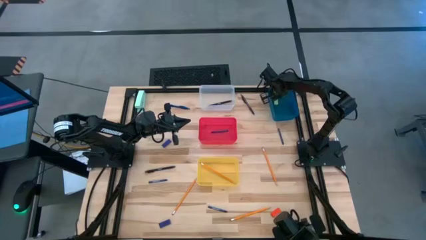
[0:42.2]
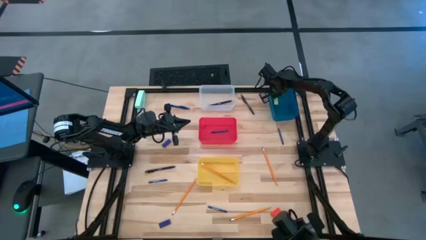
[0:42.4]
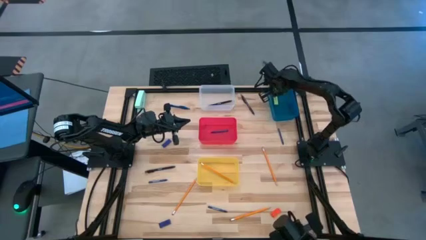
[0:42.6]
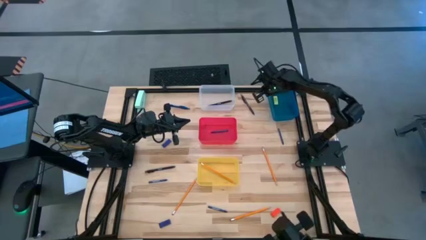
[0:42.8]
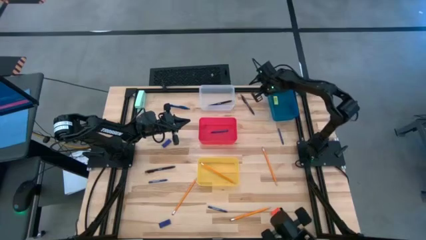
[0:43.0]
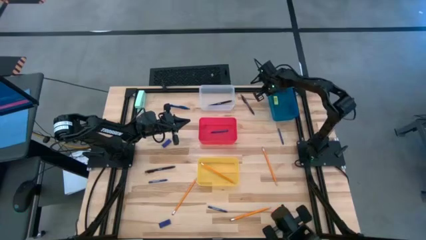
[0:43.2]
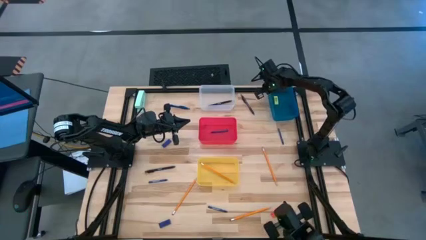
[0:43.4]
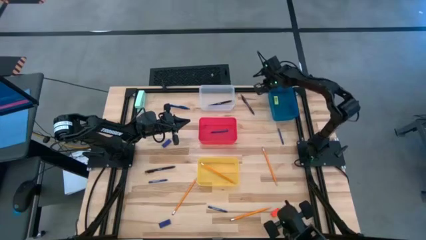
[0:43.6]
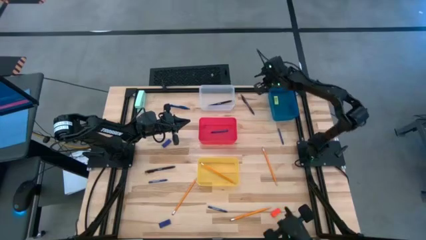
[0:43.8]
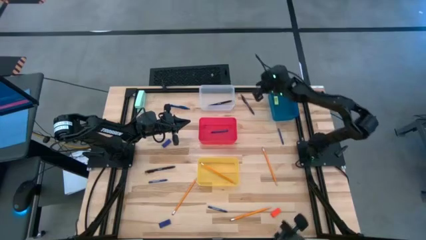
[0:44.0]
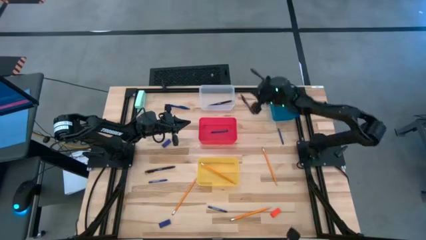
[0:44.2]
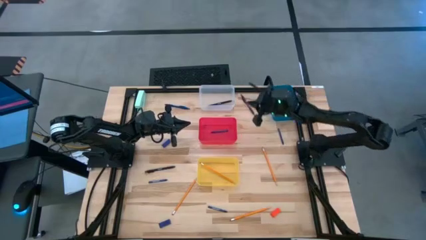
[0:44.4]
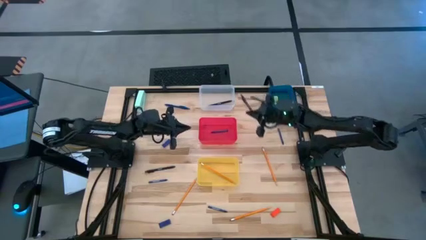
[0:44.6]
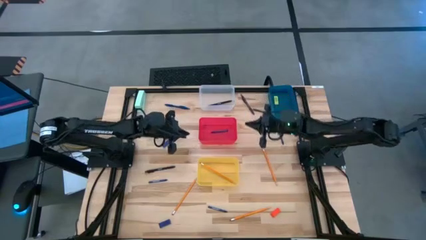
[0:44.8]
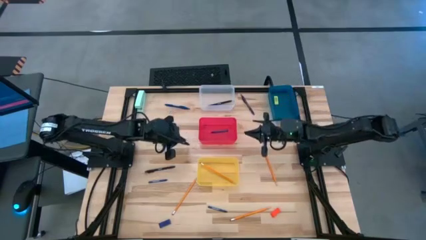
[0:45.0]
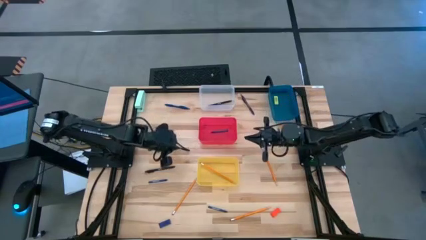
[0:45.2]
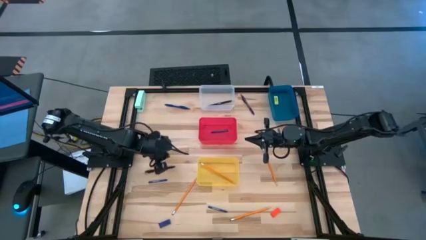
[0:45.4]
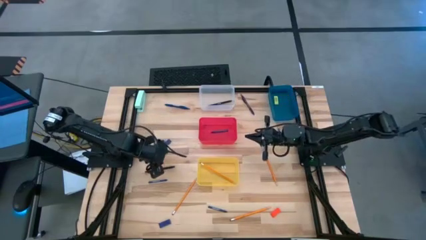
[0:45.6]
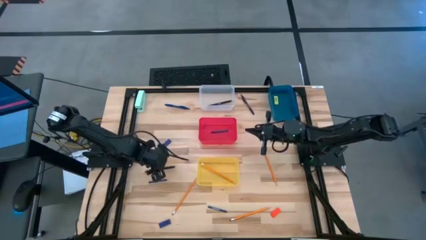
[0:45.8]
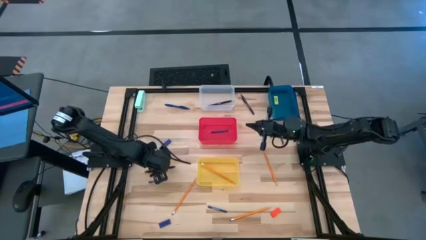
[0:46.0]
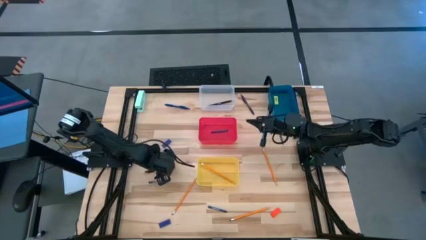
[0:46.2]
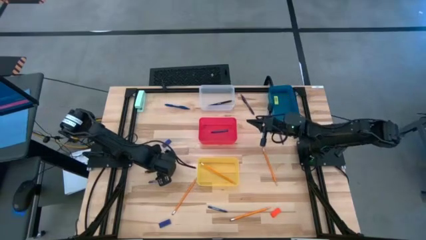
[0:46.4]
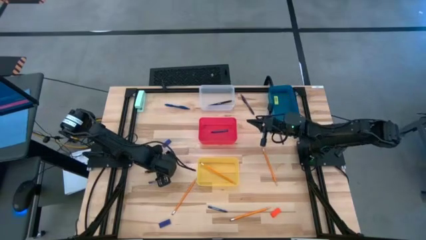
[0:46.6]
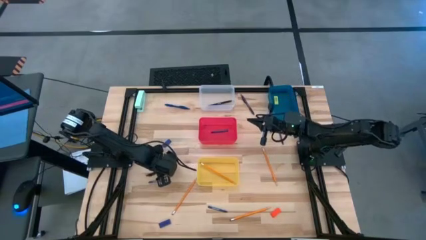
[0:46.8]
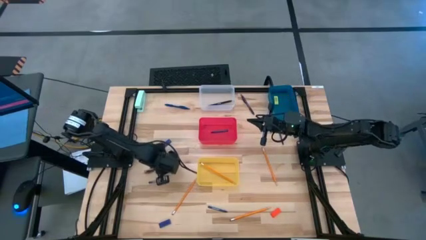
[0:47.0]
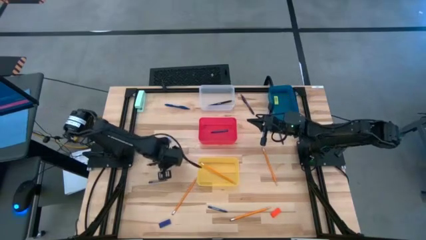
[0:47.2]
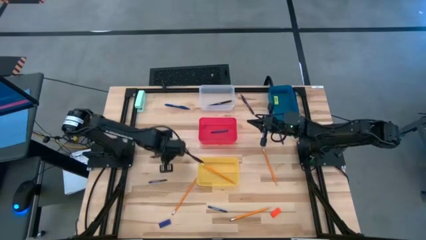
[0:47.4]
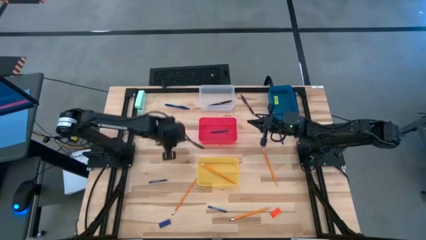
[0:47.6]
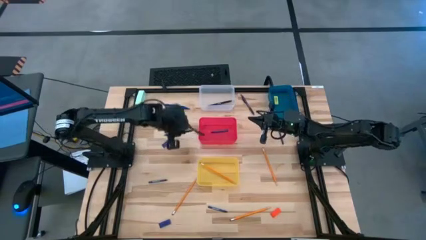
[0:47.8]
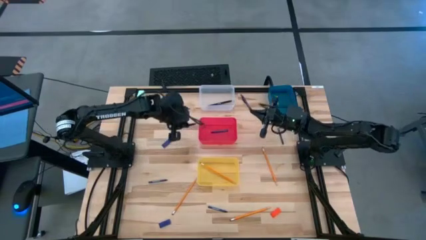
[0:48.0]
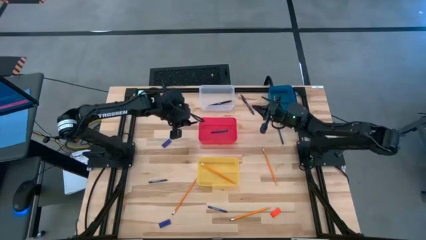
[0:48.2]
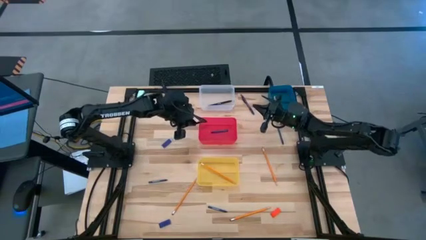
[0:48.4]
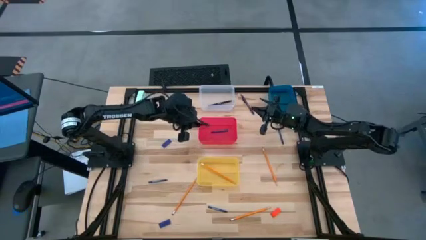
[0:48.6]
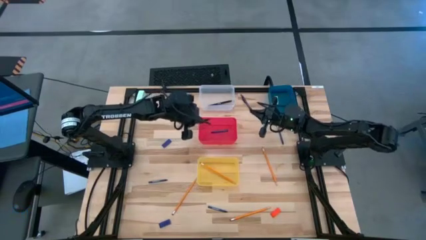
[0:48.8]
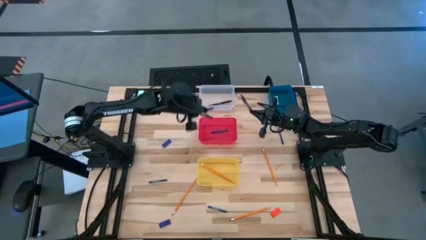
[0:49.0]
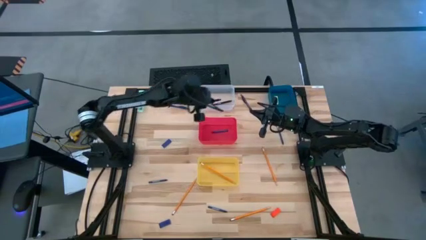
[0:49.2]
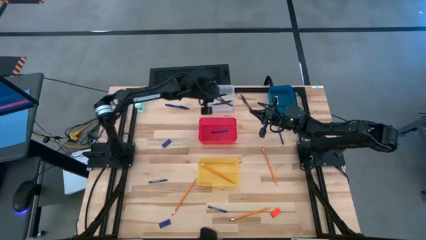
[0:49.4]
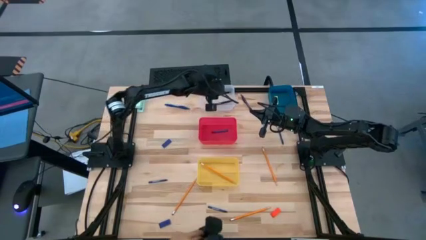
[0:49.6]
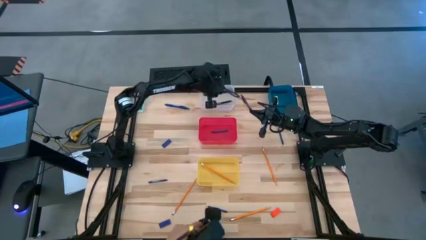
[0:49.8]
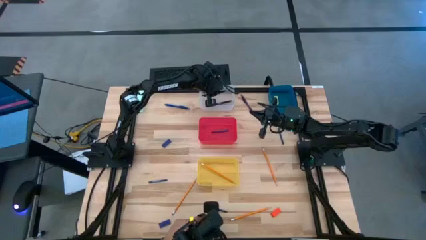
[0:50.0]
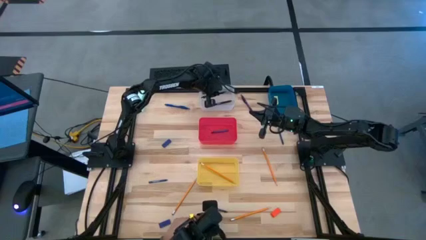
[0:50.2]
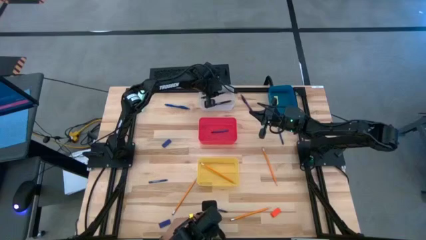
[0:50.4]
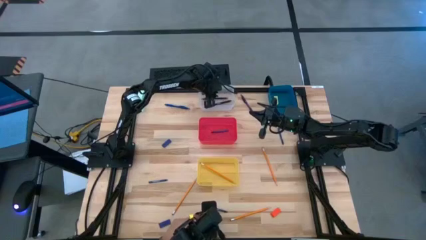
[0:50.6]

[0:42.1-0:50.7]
Task: Sort crayons/erasers/pens/pencils in bins
Put the left black ballpen into the transparent bin

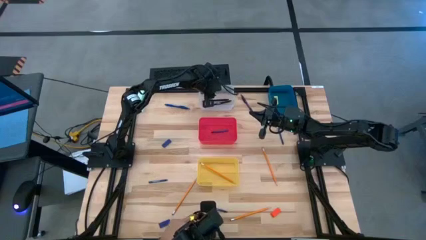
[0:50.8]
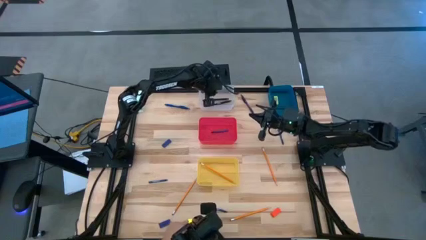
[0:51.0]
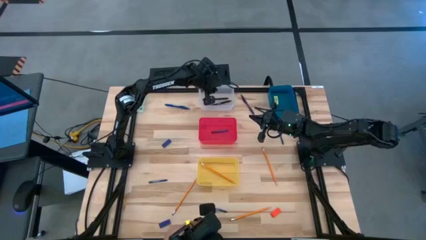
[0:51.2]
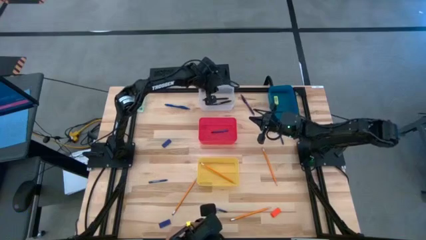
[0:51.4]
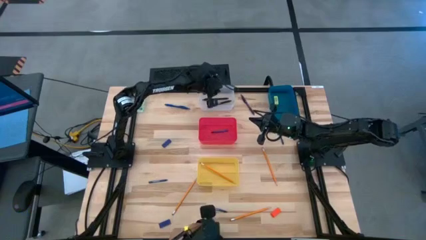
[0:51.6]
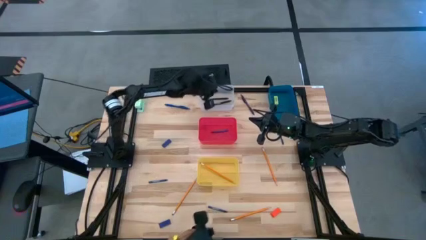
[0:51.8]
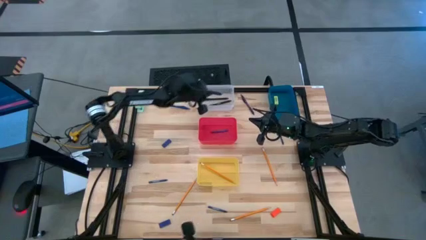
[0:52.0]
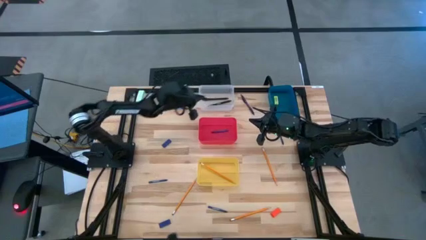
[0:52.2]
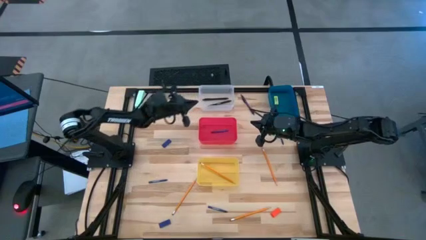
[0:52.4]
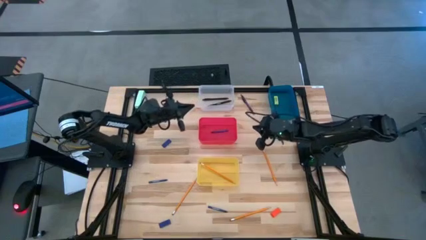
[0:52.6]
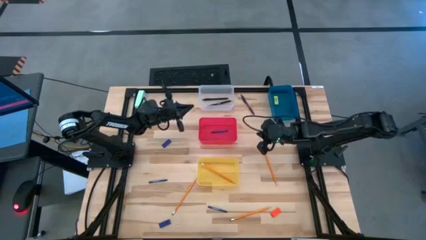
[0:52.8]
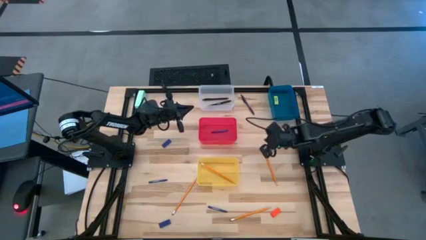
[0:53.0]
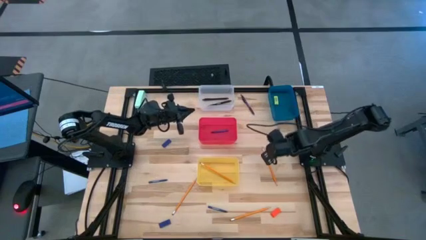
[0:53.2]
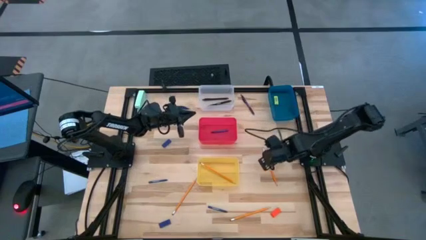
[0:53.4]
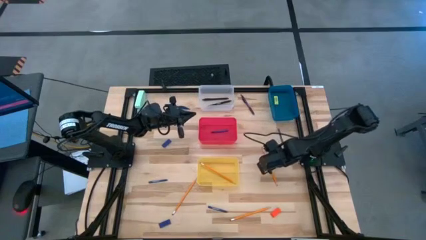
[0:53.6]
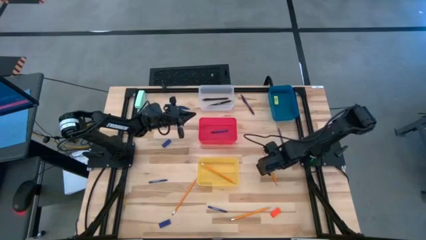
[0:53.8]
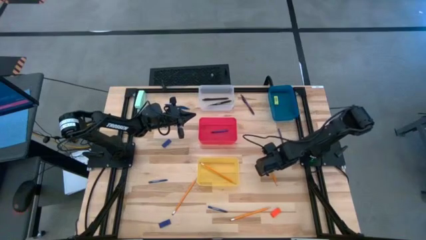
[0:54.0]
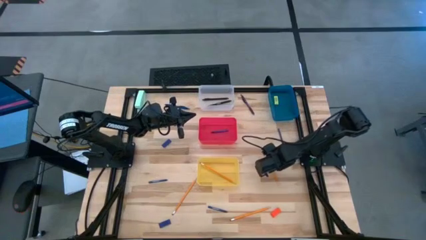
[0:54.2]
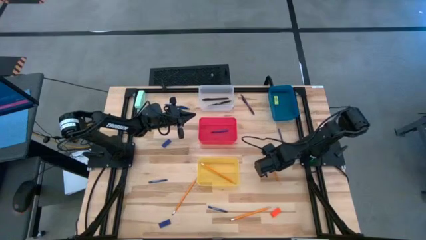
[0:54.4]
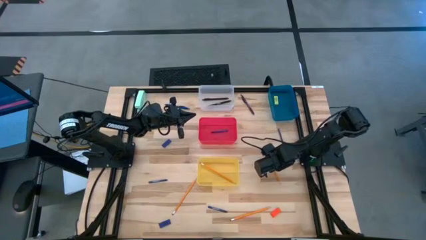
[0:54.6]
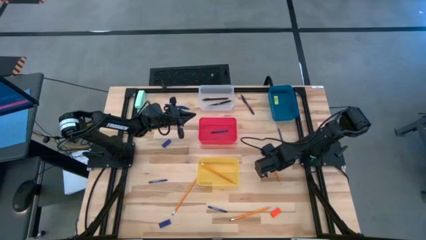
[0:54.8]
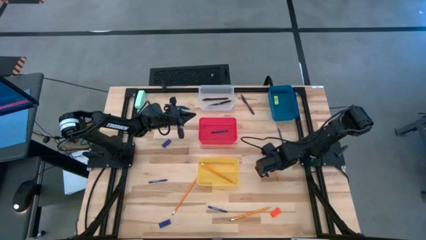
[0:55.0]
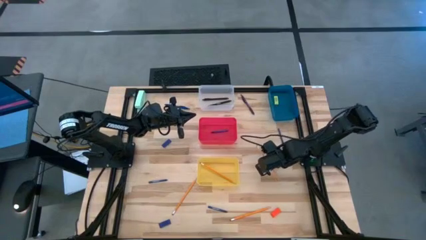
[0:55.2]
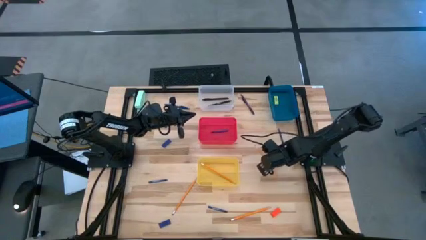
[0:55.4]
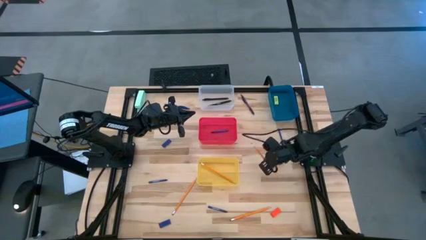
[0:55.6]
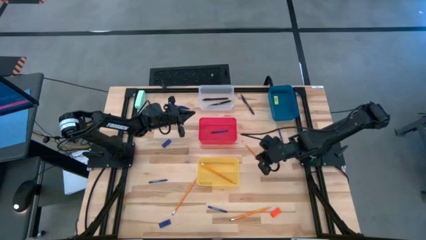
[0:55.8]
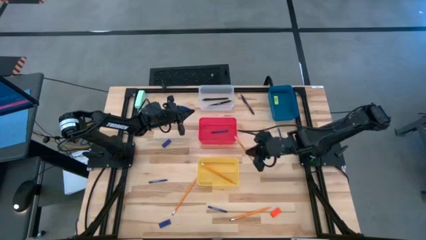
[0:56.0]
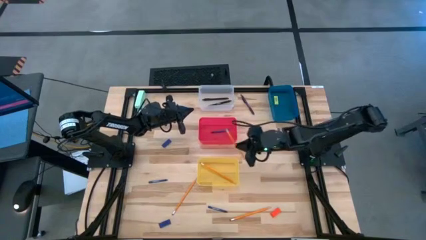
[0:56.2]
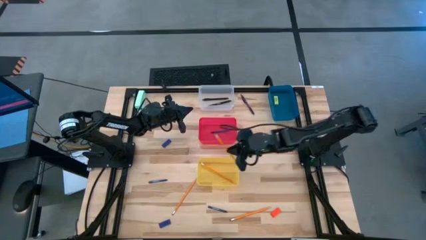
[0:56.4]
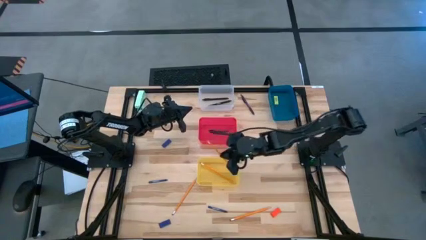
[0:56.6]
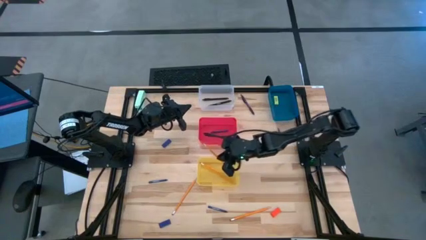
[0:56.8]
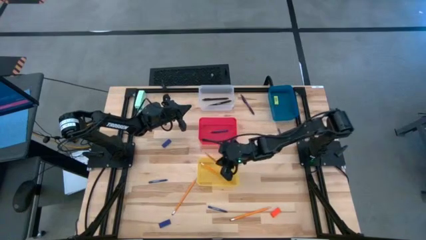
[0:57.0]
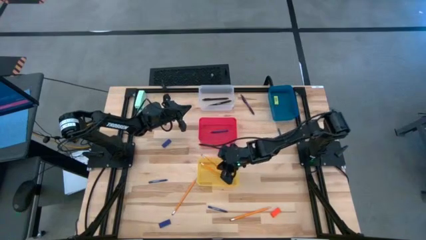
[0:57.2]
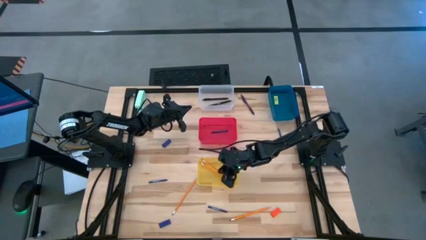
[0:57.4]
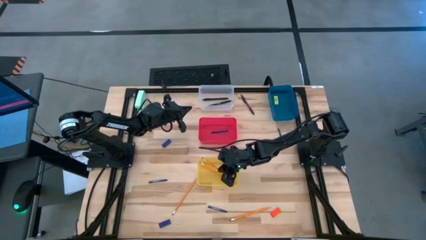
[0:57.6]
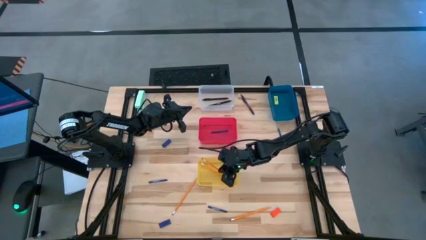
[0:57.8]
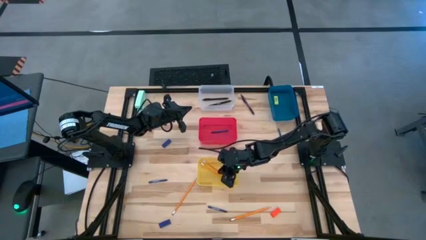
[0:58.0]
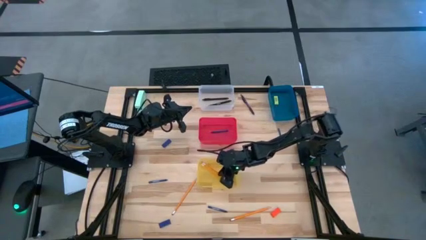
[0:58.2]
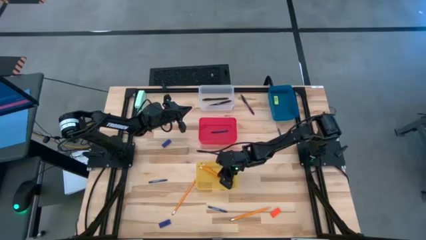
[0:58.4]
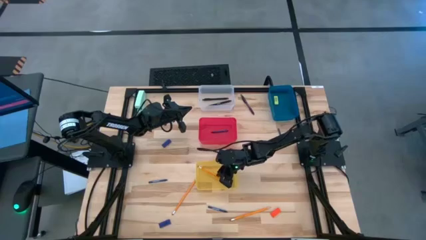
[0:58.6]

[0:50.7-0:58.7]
Put the top right orange pencil into the yellow bin
